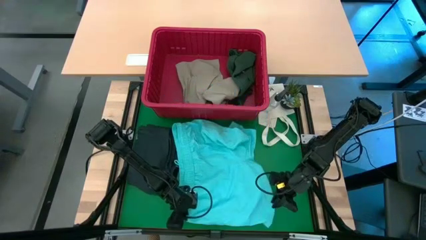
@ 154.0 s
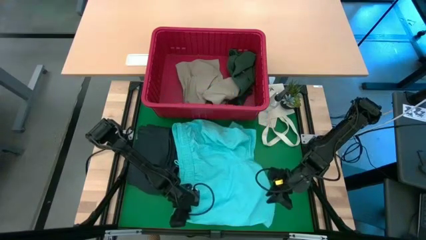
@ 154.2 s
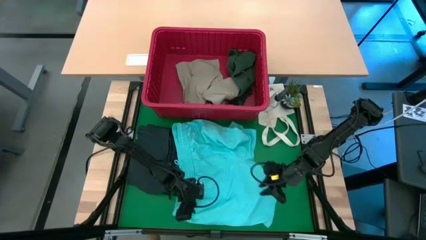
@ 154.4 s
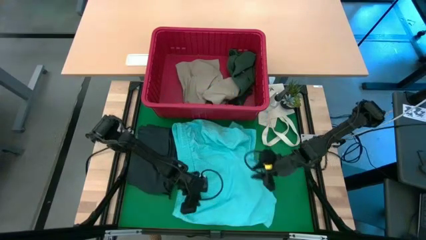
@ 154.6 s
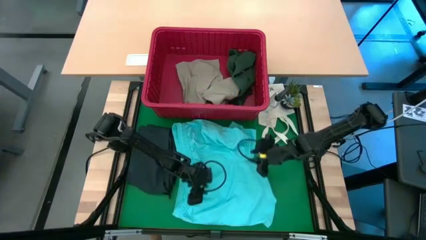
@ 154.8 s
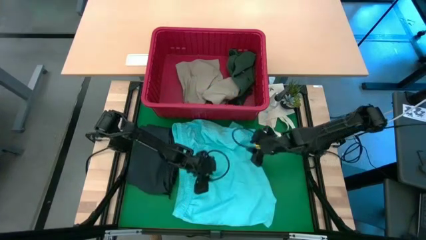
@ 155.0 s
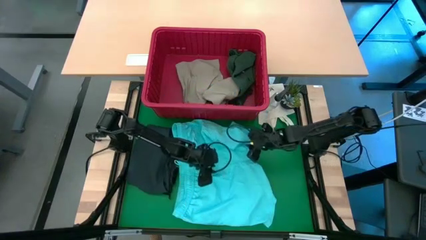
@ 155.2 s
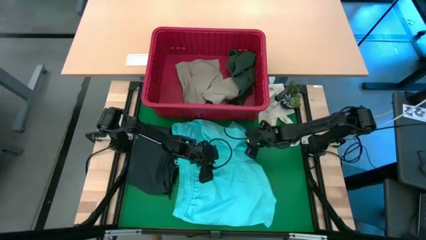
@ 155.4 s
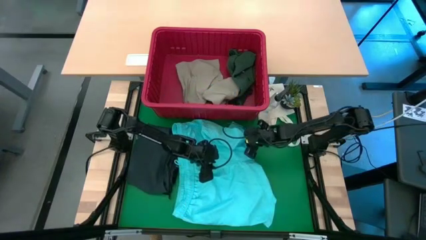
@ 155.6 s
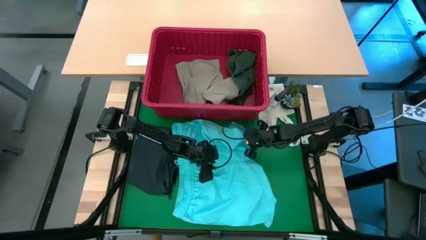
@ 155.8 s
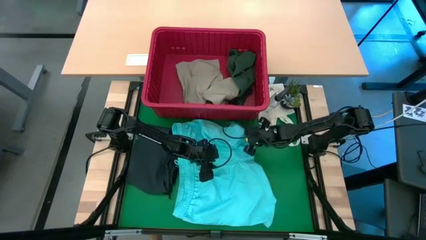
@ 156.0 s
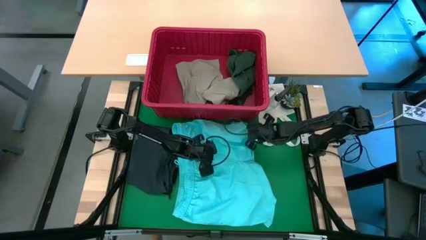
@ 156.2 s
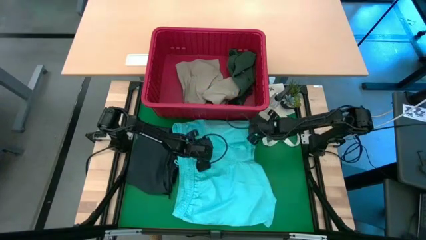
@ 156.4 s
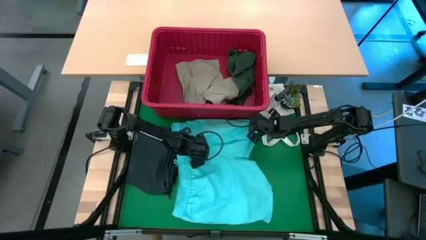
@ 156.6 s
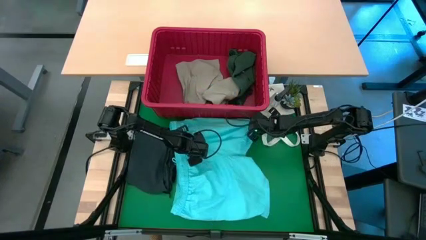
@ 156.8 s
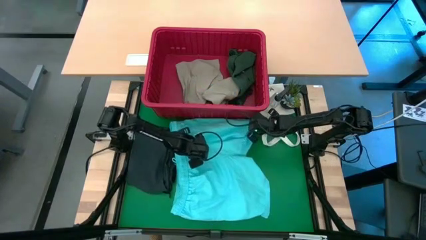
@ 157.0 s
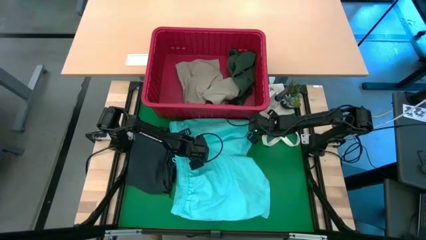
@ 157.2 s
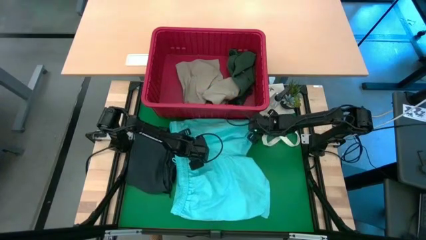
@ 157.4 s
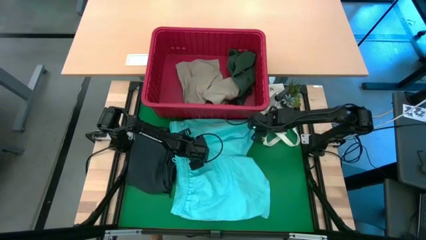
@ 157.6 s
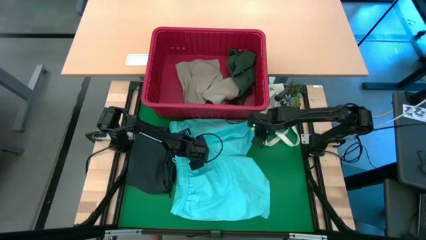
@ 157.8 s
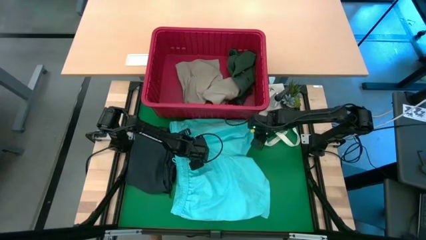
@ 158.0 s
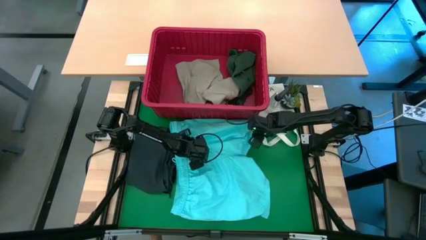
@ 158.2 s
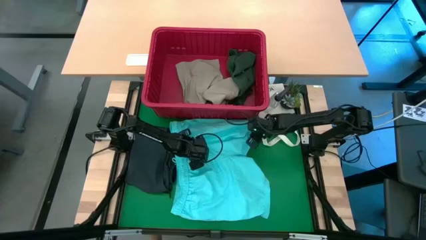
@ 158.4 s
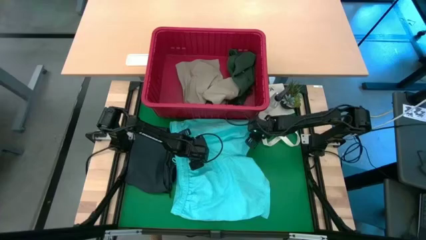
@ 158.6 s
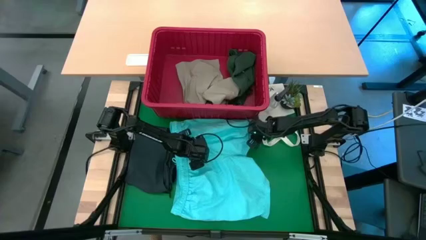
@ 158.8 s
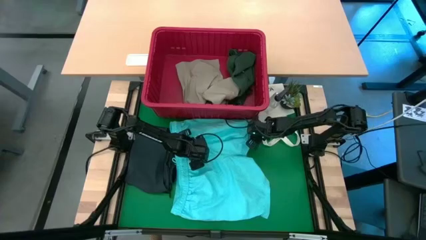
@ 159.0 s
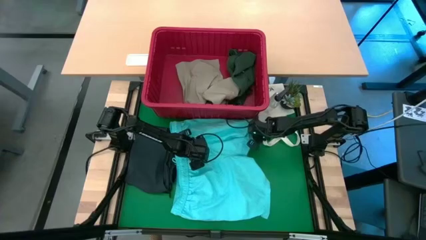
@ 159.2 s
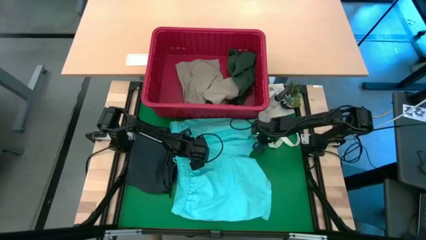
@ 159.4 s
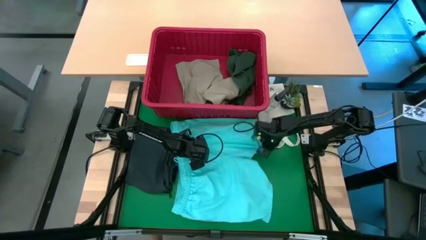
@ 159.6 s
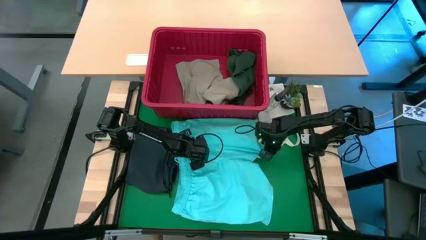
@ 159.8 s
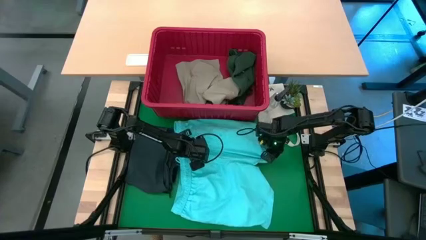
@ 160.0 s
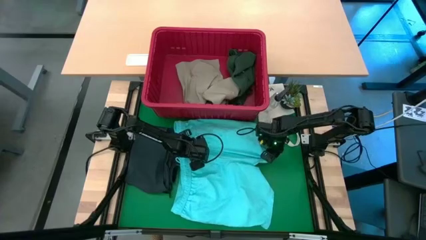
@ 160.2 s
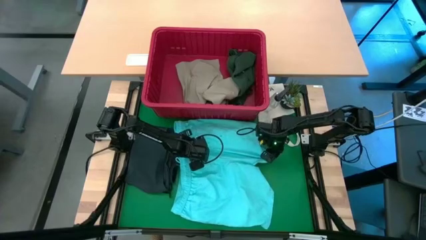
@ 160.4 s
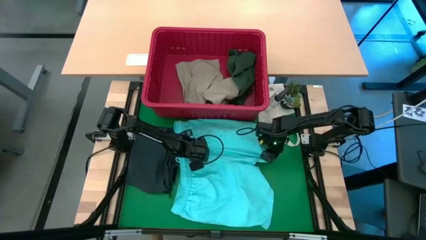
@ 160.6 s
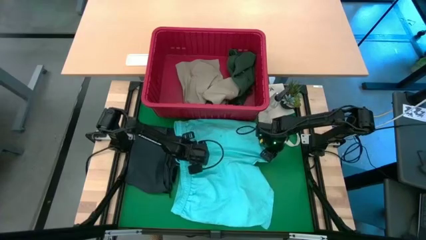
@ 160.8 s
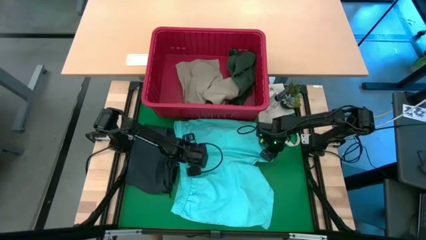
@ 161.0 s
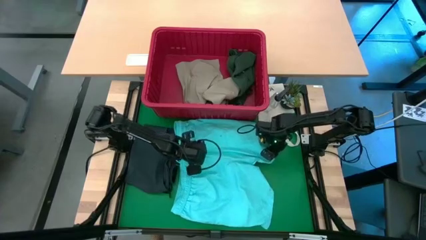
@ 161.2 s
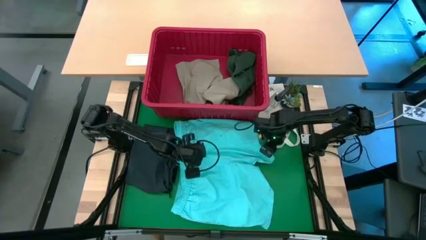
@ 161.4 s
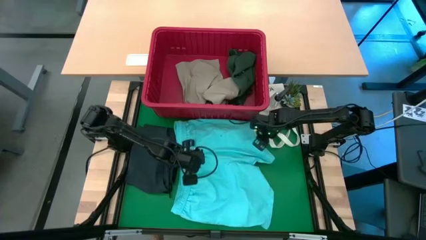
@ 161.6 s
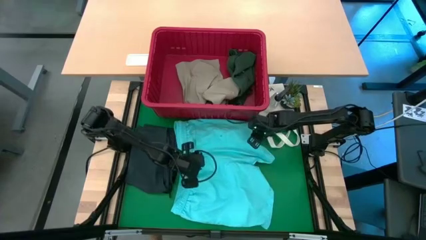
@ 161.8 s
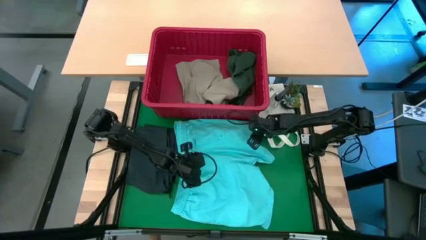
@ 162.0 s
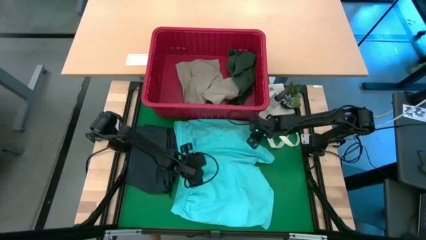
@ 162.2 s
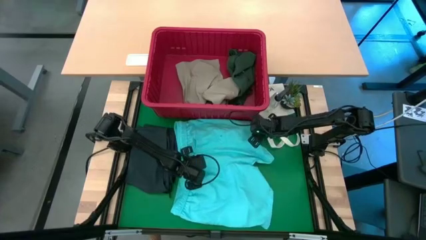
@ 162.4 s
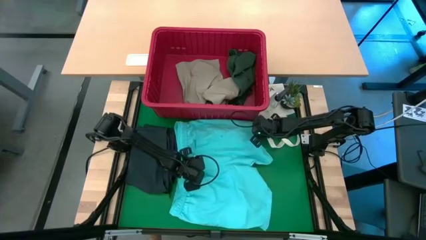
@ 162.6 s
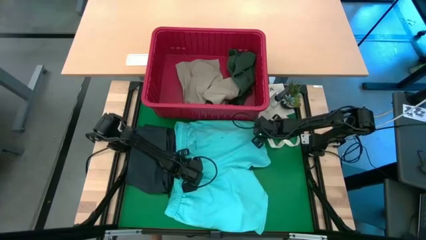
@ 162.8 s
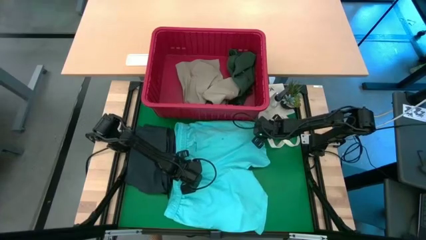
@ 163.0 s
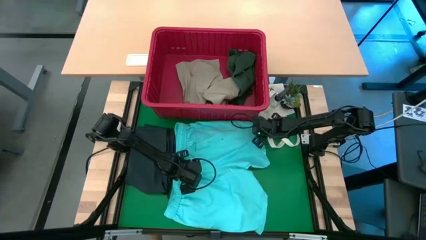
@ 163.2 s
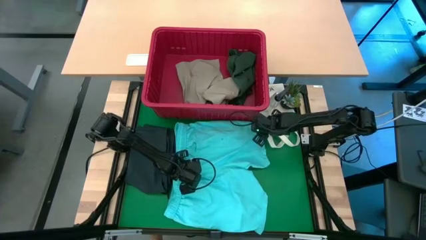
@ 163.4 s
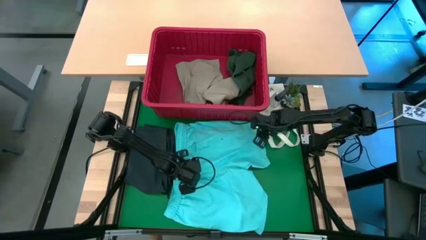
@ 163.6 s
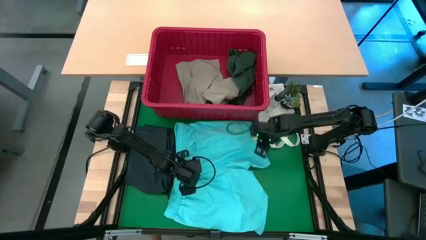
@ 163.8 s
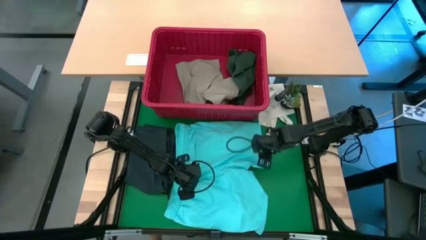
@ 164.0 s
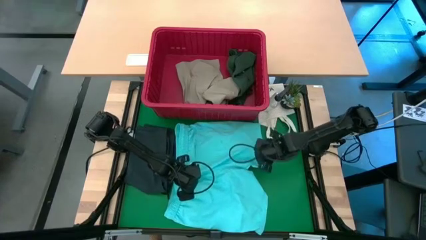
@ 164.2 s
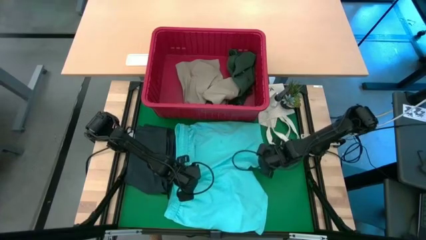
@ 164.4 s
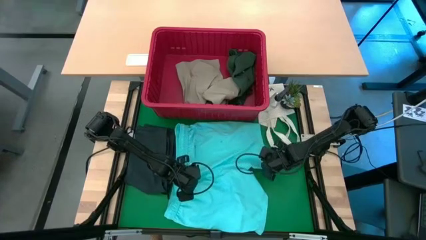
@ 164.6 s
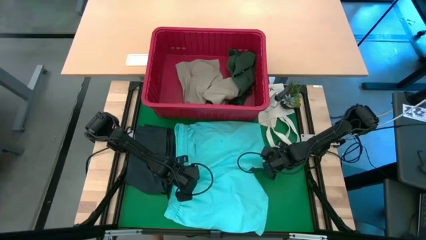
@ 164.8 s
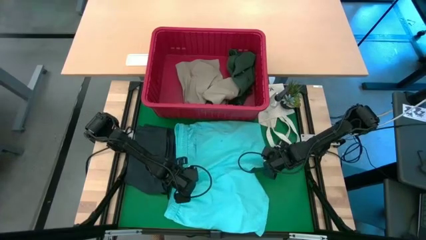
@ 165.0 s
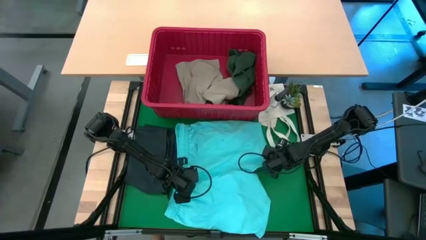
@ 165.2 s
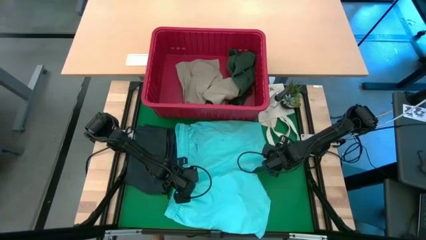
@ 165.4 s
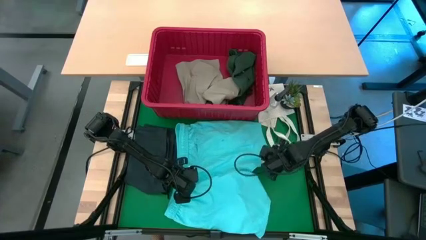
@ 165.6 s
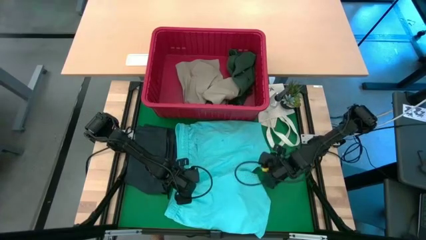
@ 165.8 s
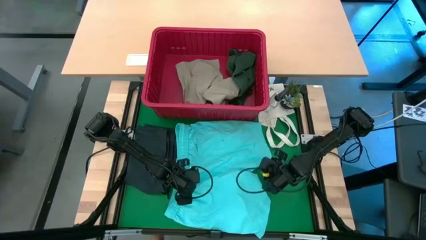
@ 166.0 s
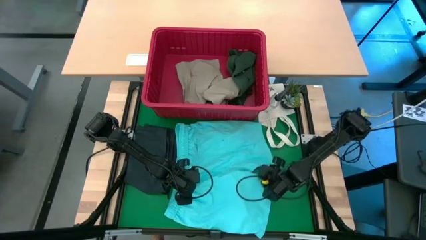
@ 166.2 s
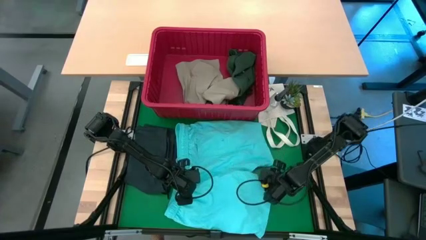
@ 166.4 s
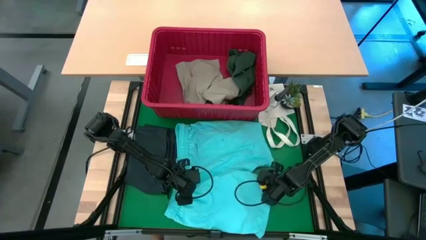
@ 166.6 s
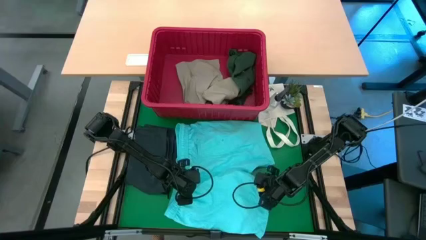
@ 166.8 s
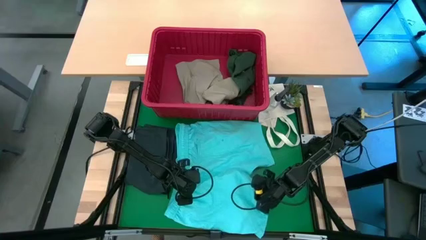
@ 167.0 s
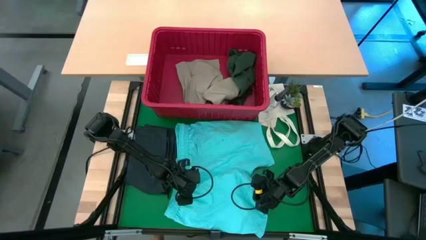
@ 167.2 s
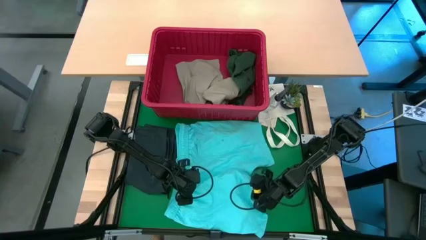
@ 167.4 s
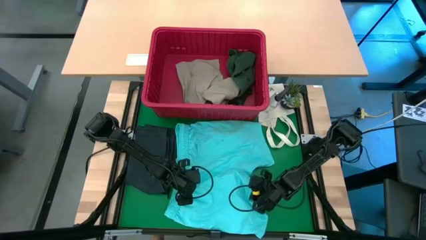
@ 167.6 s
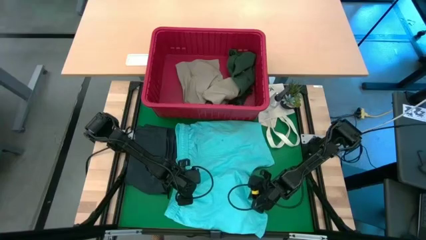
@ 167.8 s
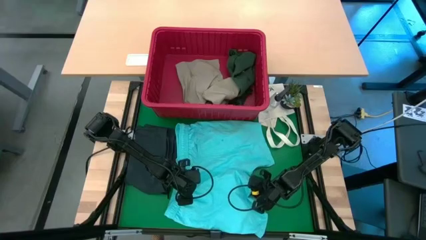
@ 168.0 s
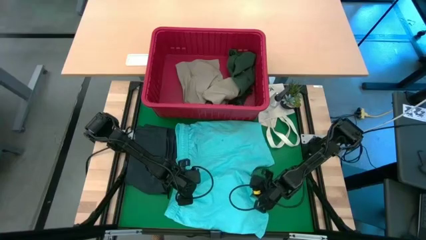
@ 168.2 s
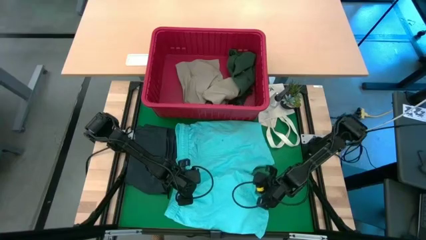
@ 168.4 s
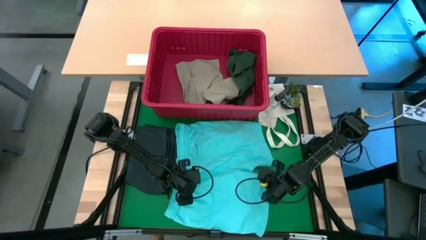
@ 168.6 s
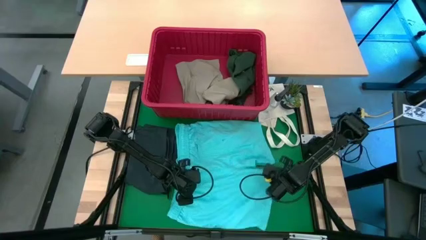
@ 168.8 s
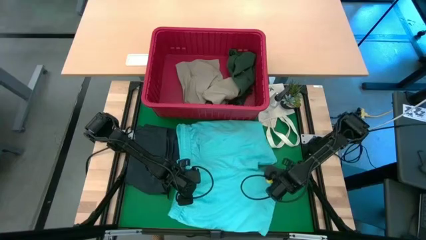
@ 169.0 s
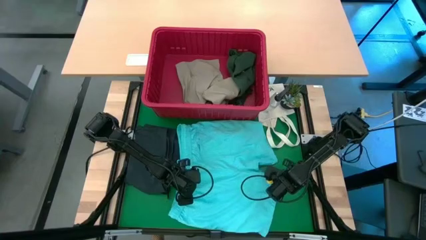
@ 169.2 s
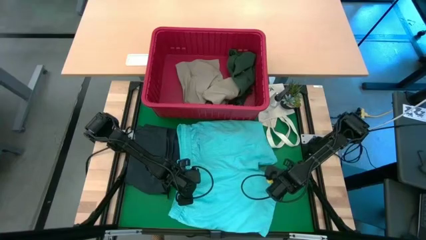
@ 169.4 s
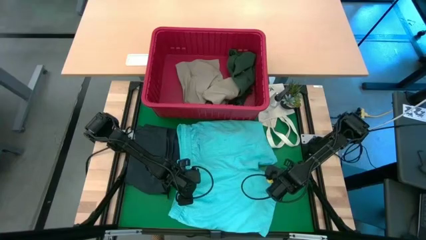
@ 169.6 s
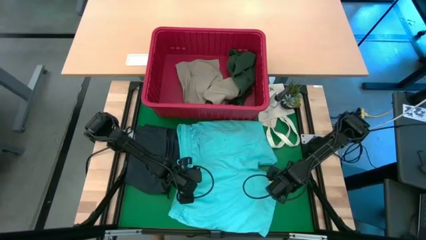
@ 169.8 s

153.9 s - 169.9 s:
Task: Fold Laundry from Bin
Fold the blue shorts from the red laundry bin

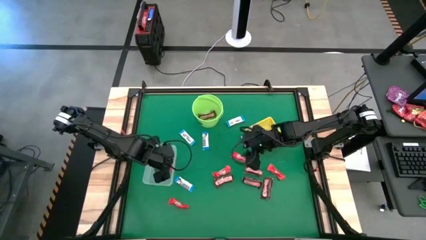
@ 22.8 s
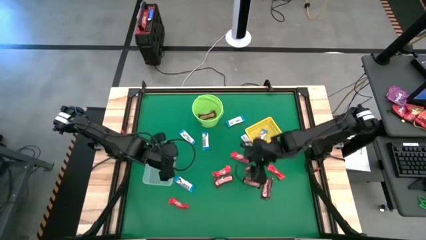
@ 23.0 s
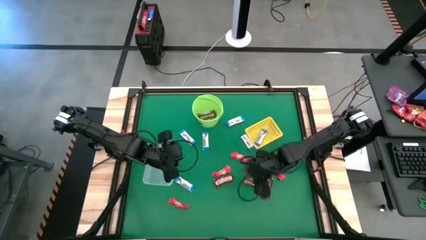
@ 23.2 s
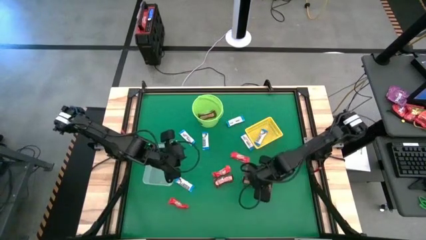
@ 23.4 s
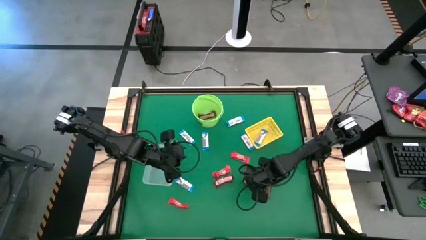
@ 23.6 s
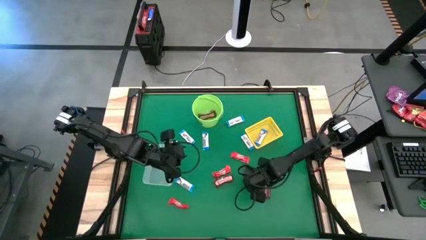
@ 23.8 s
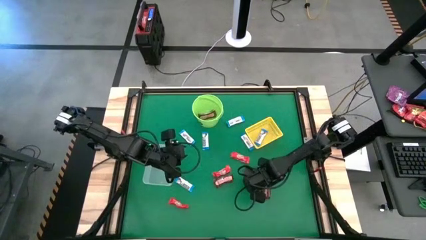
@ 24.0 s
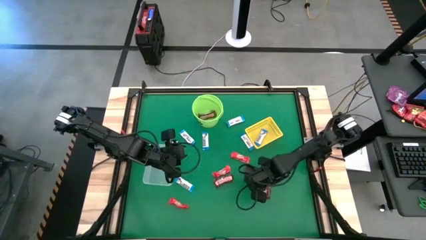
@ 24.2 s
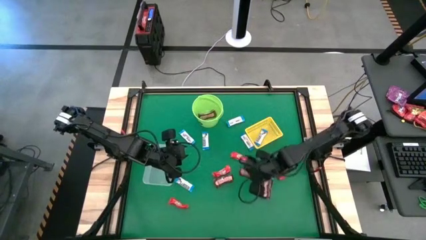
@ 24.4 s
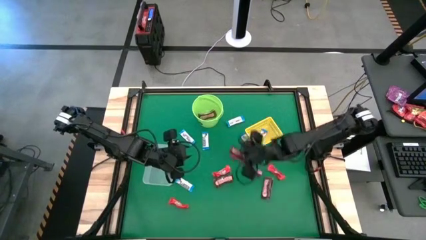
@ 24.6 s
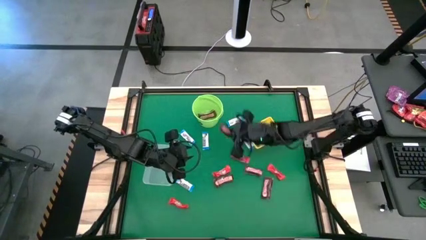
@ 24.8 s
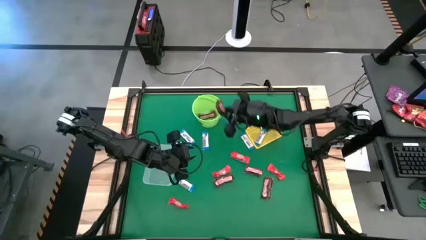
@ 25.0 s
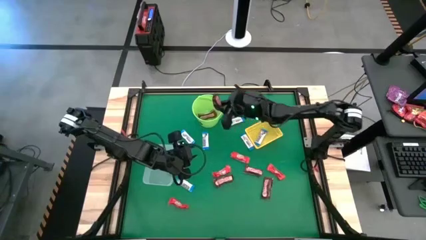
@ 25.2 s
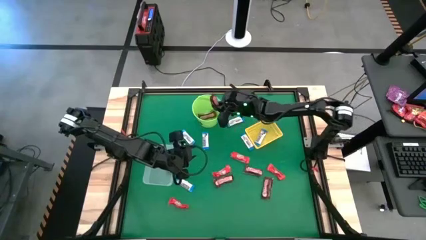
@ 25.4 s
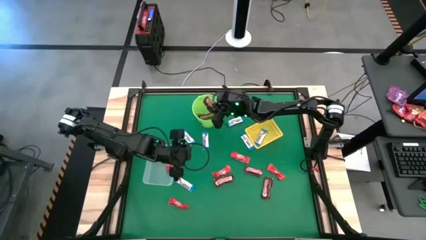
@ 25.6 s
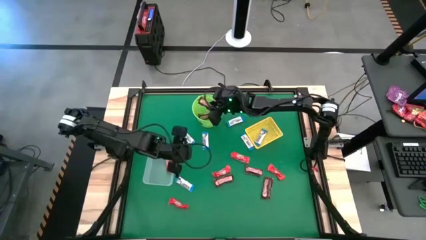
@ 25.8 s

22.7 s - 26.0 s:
Task: Sort candy by brand, put in halloween buckets
Put the brown chocolate bar into the green bucket
